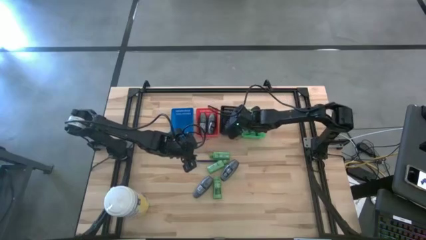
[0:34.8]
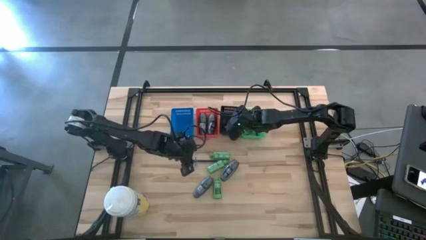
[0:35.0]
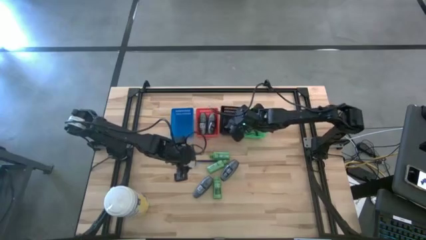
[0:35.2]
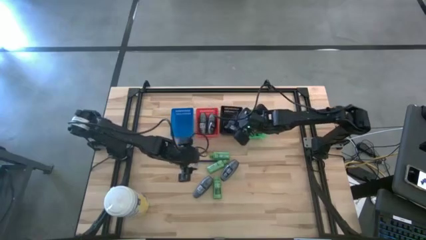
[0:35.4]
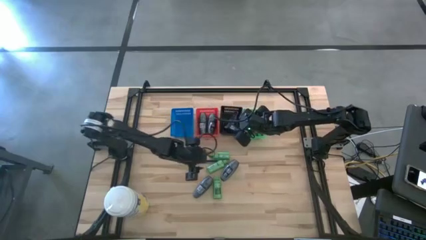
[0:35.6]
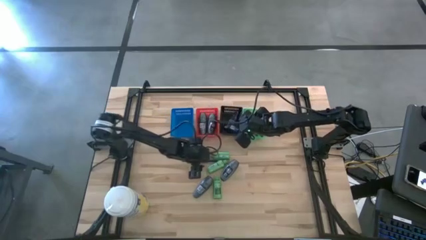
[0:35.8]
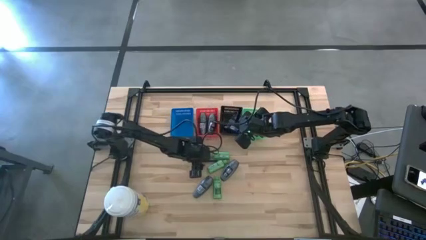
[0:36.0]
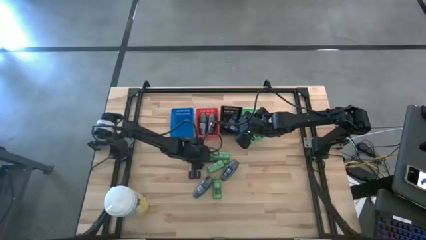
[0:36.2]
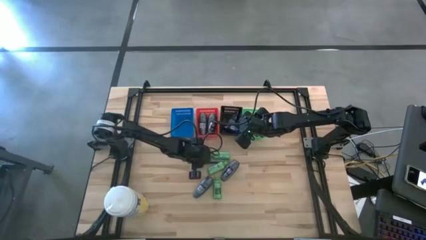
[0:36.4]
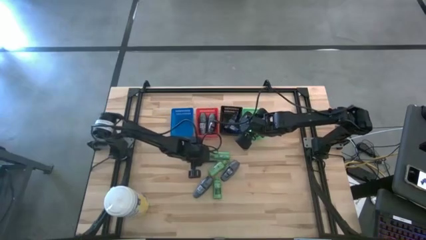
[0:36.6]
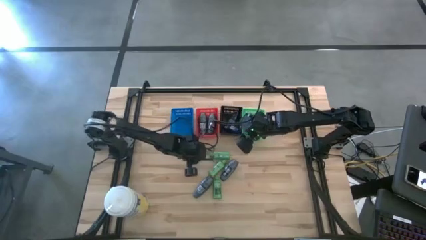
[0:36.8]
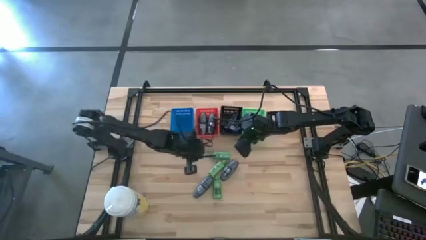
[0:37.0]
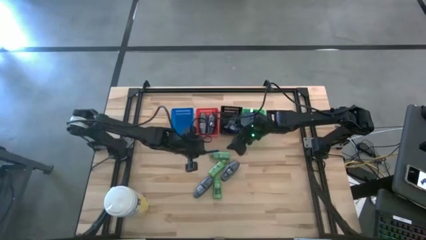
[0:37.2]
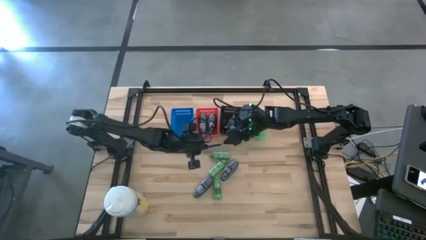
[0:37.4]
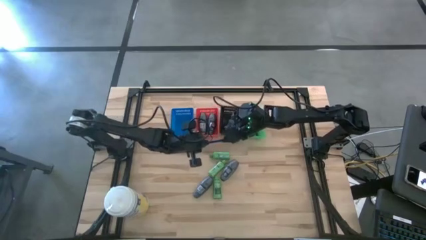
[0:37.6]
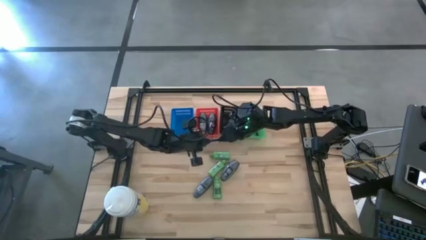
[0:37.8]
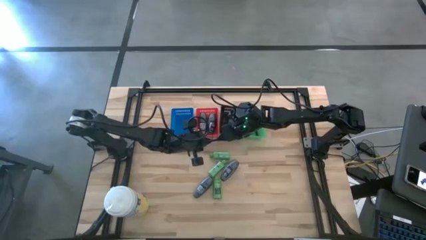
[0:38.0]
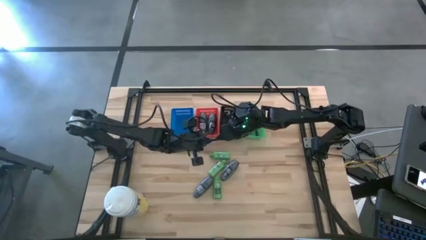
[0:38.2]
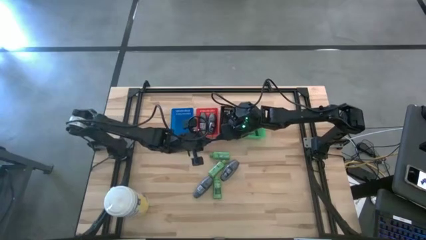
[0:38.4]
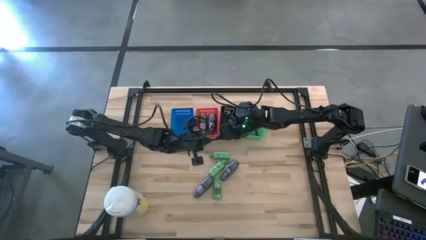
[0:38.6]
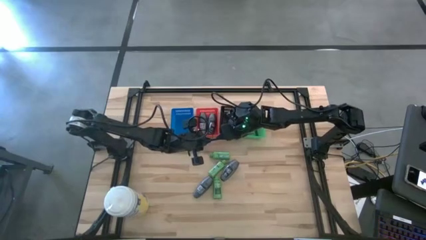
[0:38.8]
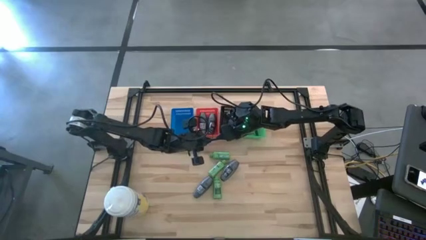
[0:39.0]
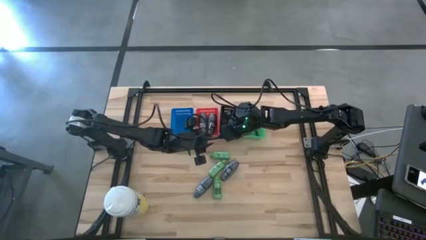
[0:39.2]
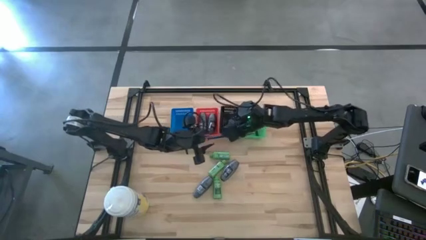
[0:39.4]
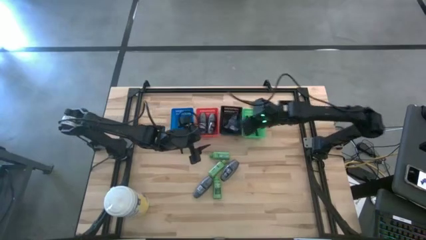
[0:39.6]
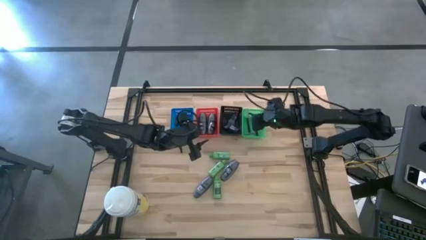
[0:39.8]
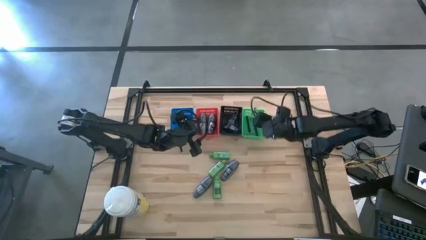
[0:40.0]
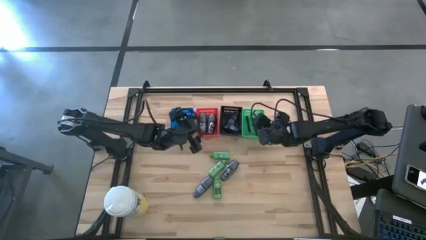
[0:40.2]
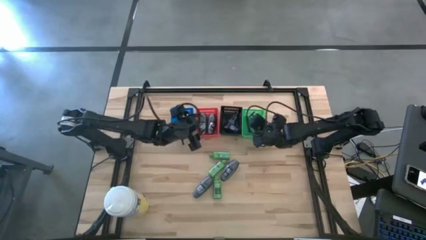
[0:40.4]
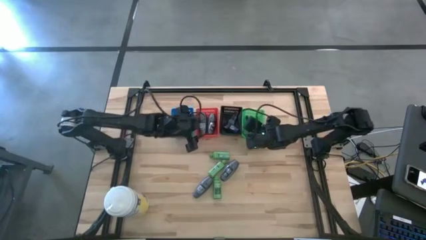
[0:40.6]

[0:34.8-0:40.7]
Task: Pick & Place Travel size toiletries
Put the blue razor into the green bin

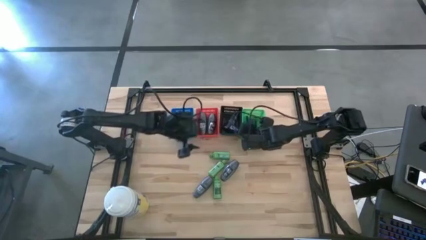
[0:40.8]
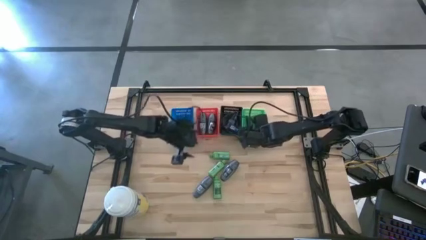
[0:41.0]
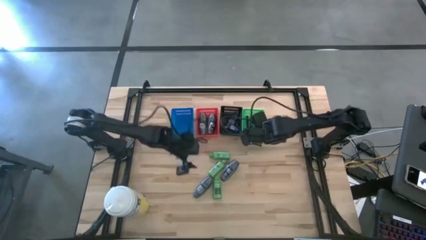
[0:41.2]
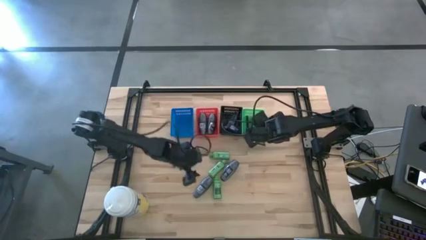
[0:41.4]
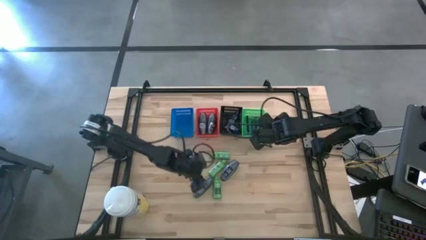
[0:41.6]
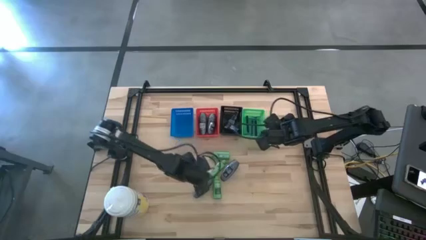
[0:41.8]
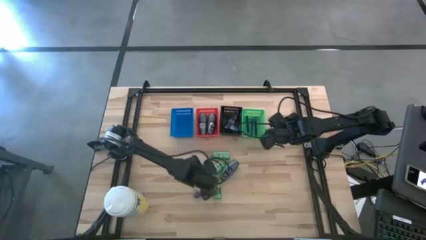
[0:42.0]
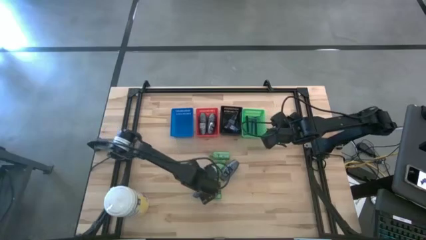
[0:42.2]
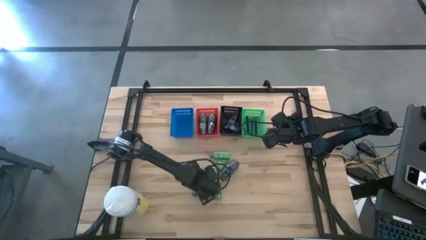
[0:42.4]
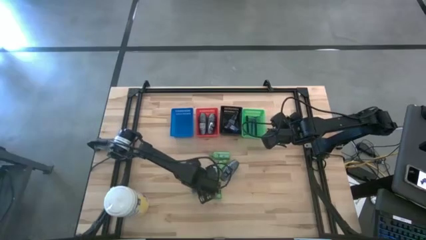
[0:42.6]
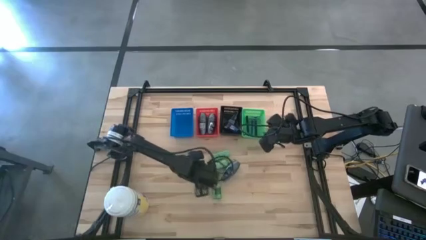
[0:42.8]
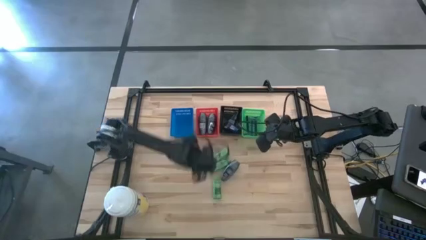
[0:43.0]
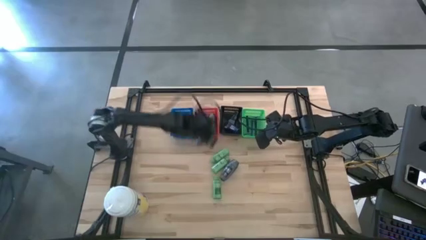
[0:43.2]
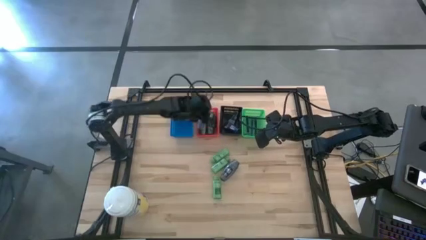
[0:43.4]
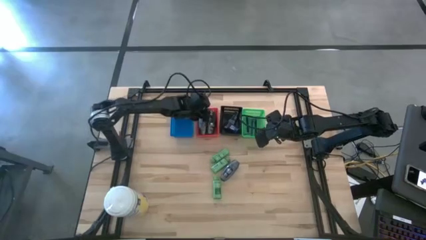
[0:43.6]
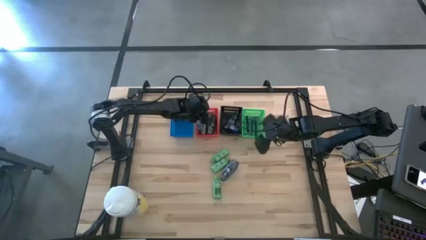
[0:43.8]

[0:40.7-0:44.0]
Put the gray deodorant into the red bin

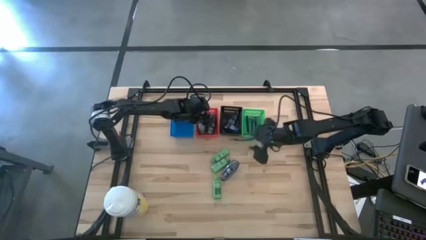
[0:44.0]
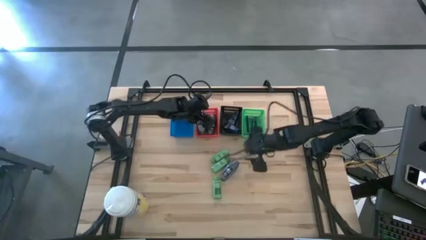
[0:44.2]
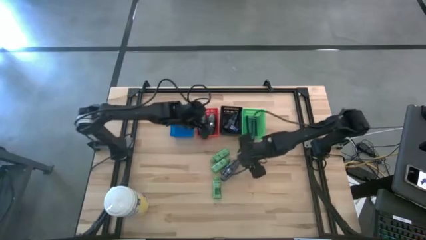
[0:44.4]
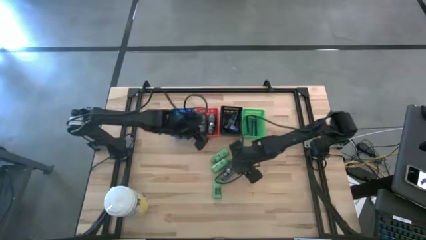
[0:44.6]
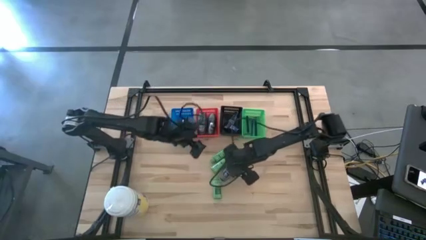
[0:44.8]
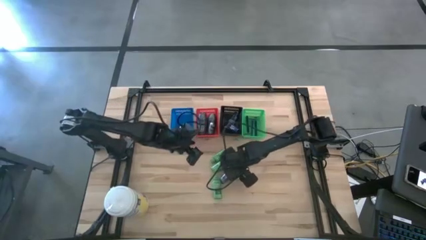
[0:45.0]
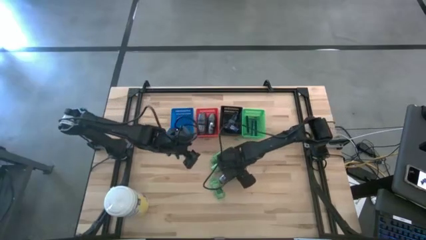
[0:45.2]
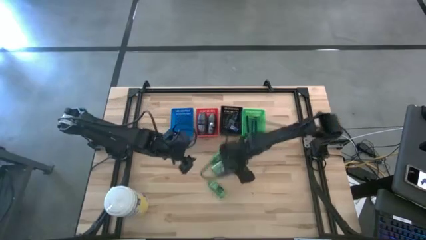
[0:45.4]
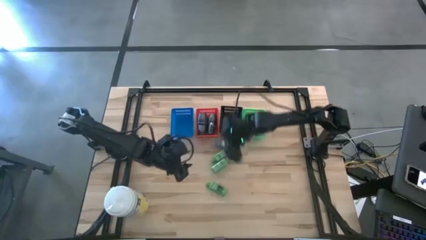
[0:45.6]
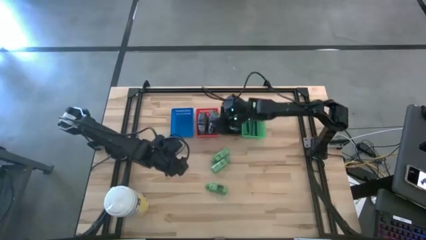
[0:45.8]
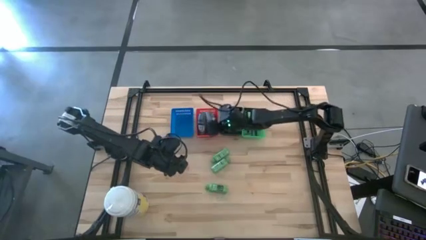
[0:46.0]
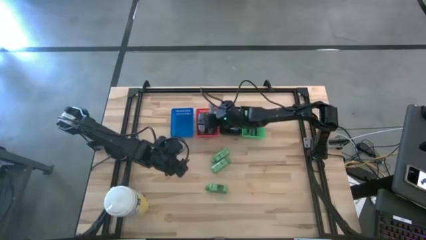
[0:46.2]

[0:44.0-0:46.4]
Put the gray deodorant into the red bin

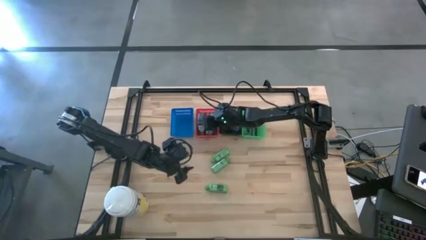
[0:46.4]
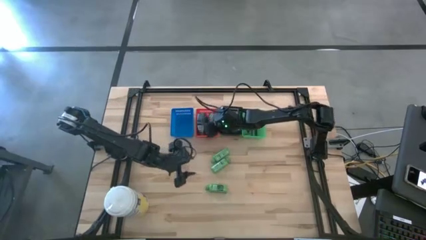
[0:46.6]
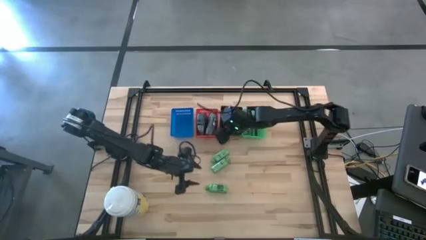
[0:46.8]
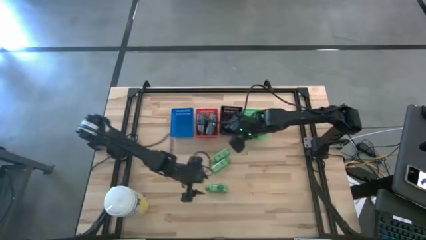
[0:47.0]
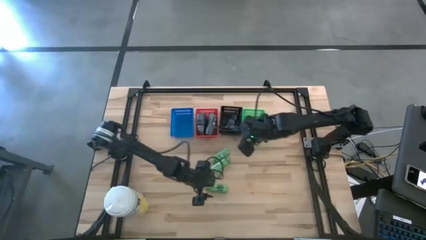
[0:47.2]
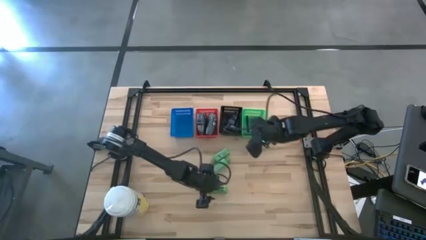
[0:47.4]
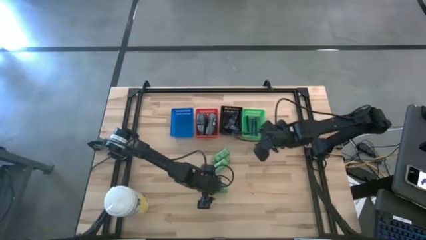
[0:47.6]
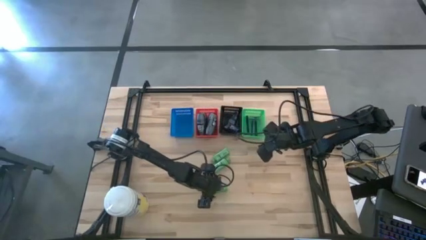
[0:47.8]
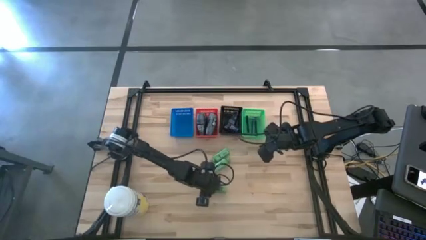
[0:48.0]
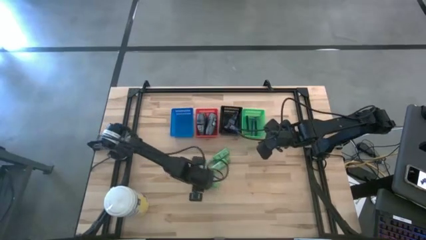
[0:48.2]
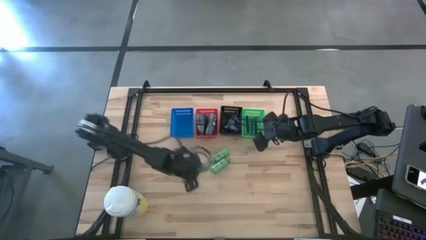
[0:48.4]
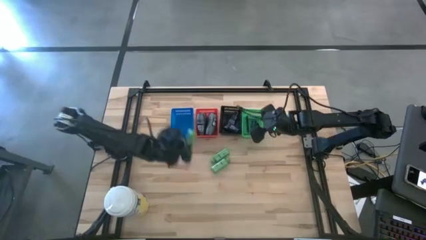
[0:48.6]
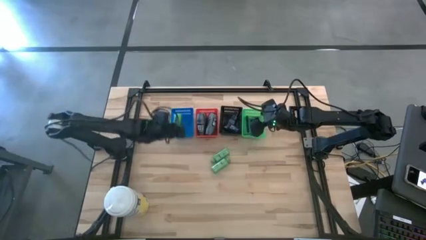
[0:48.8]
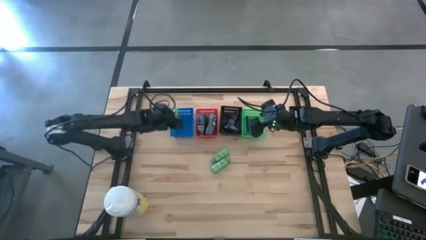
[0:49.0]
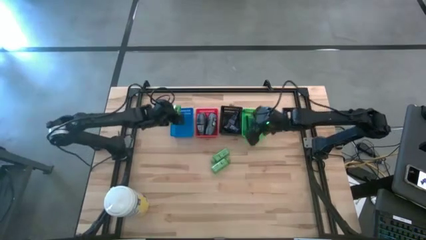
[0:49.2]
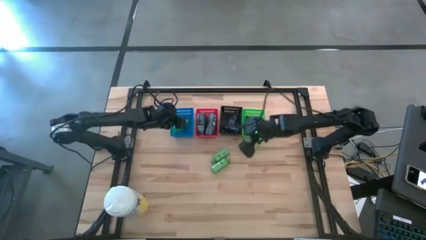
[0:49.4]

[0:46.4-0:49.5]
Put the green shampoo into the blue bin

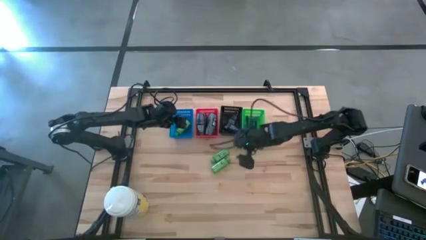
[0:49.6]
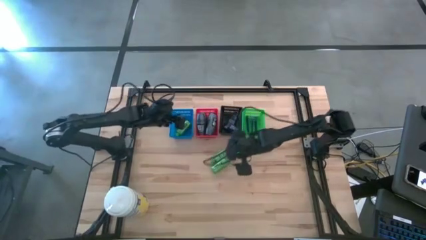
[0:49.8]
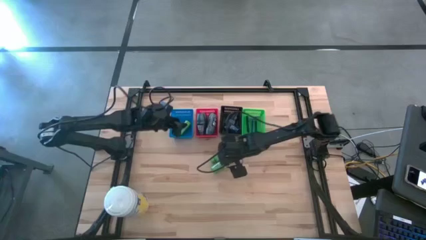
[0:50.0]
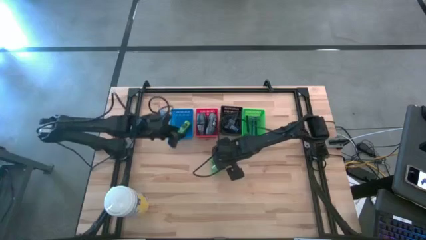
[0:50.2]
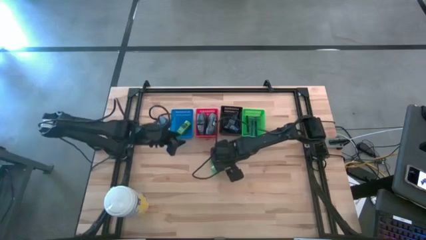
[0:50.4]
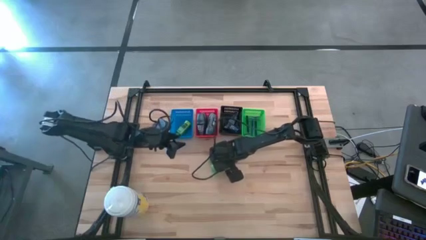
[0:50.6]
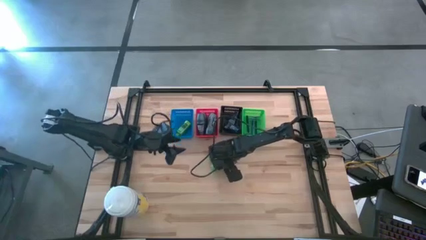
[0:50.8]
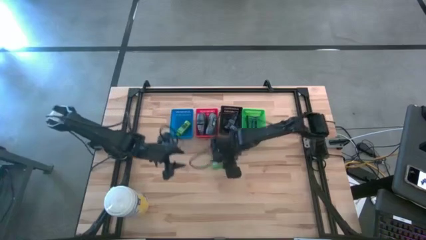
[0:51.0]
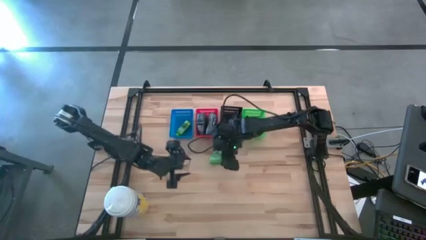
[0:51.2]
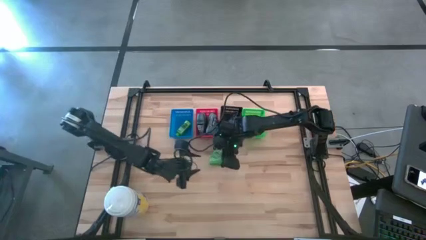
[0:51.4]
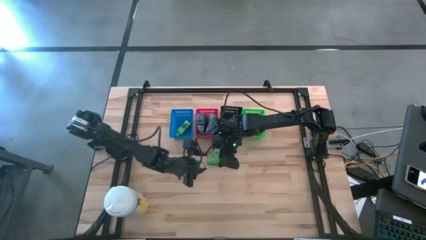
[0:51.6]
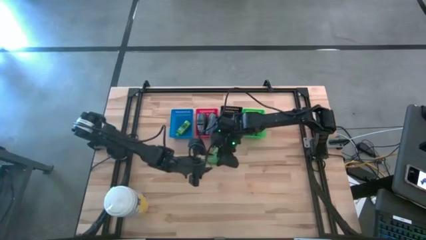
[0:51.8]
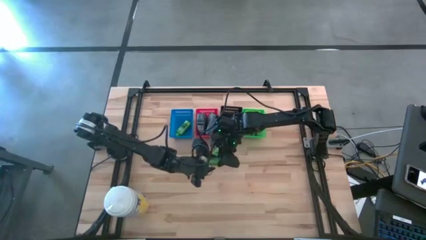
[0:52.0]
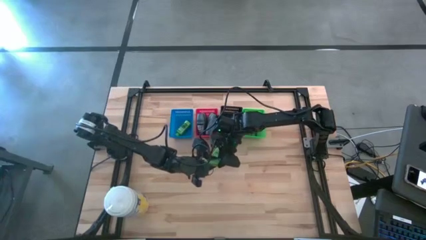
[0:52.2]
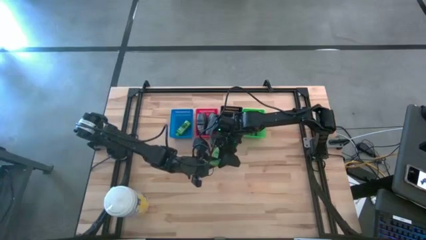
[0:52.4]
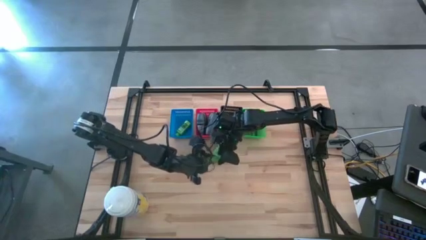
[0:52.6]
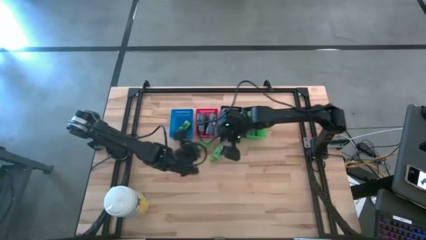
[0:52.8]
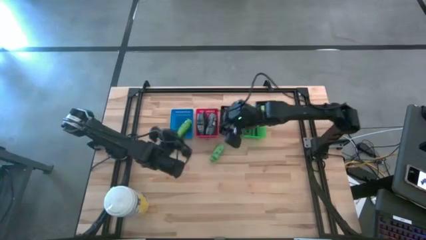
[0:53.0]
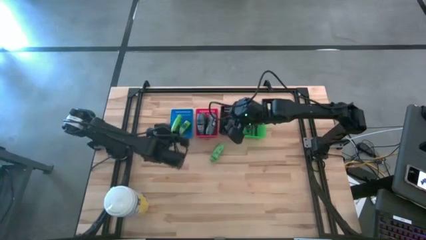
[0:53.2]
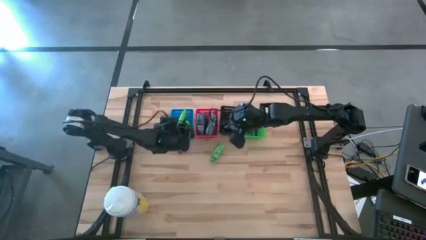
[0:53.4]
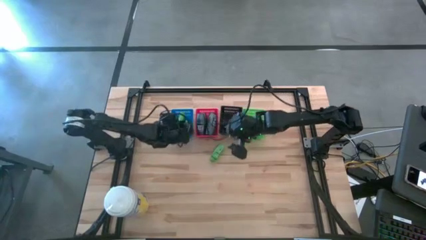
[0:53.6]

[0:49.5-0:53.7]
Put the green shampoo into the blue bin
